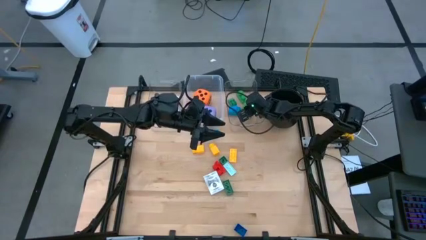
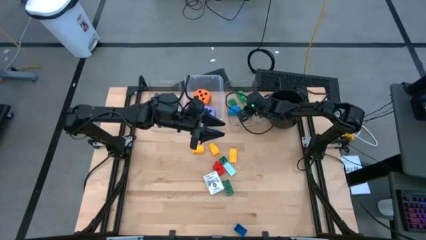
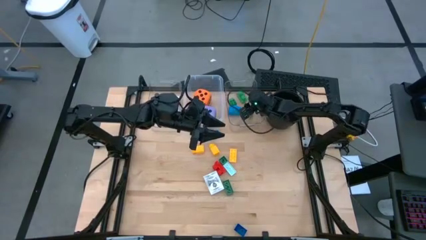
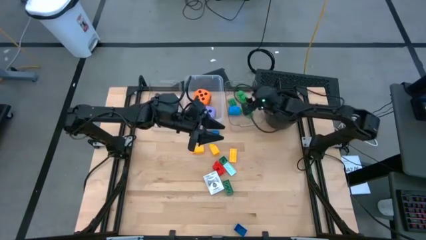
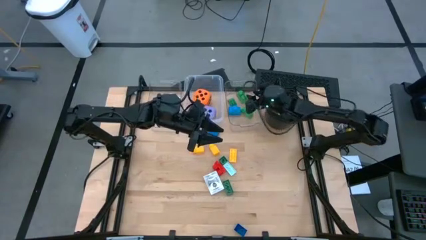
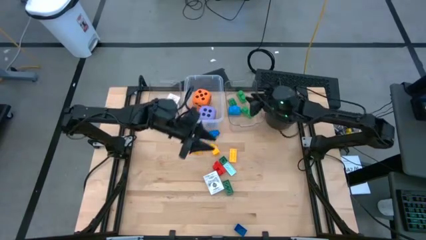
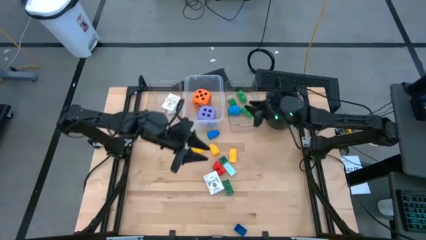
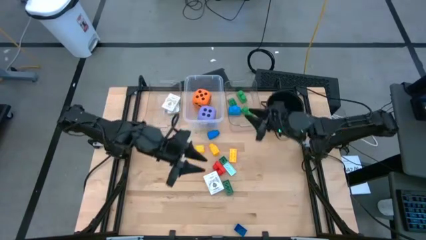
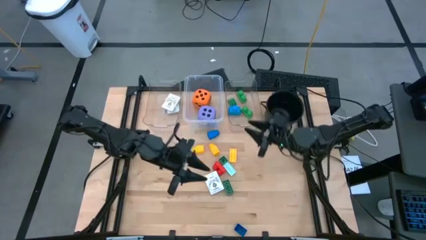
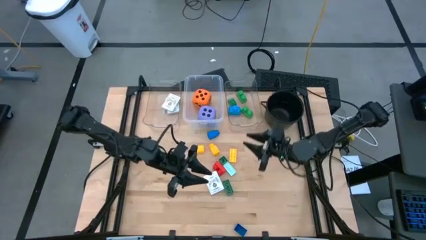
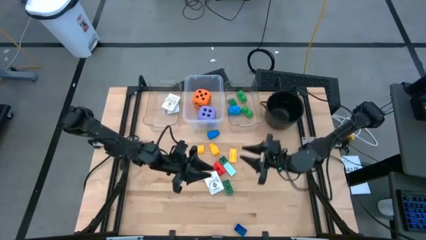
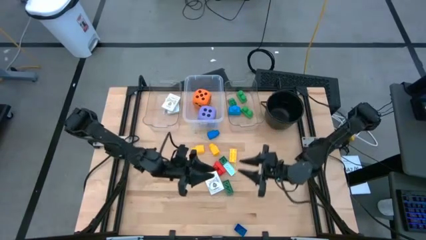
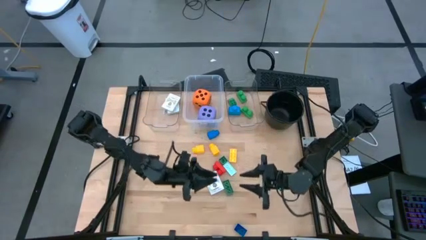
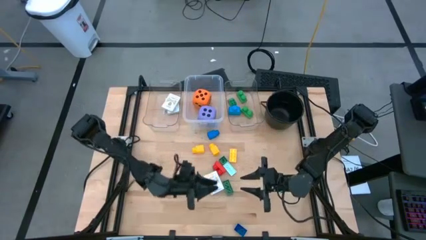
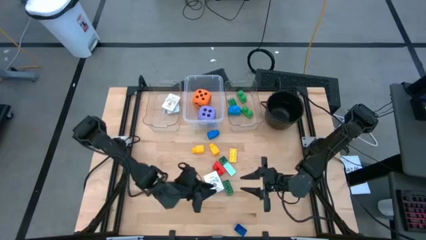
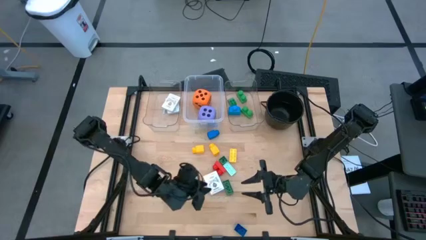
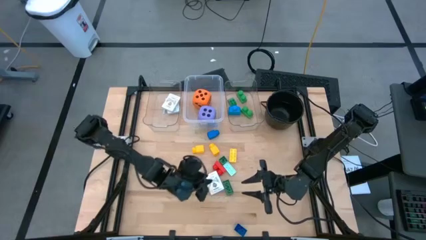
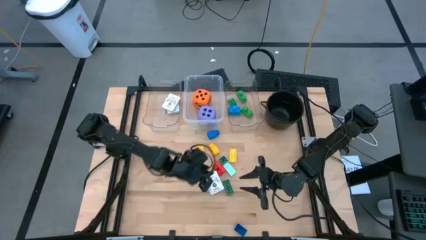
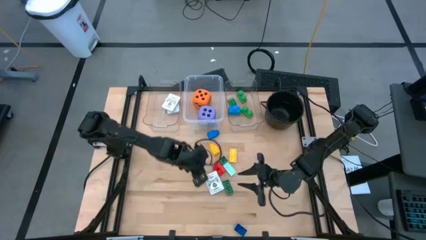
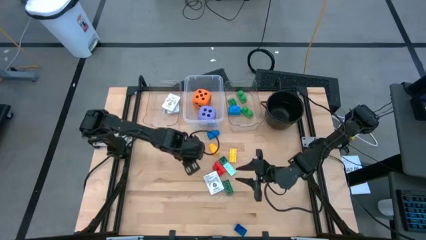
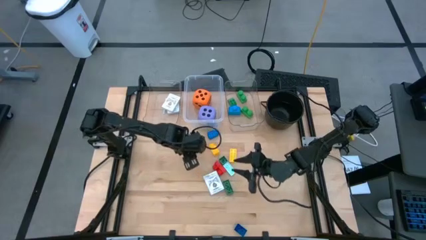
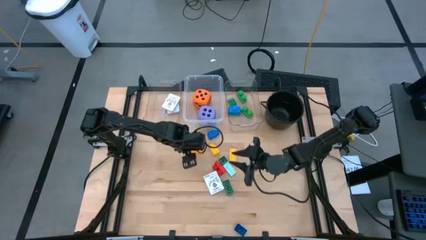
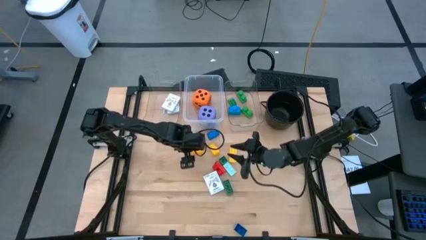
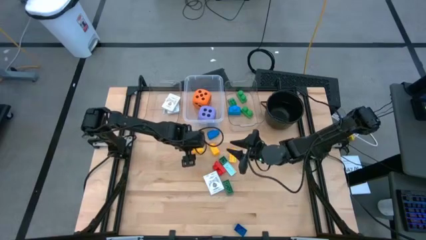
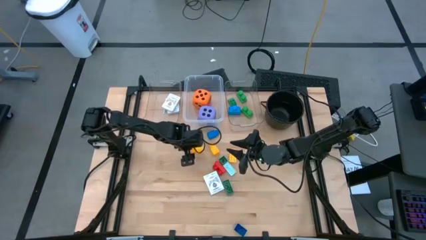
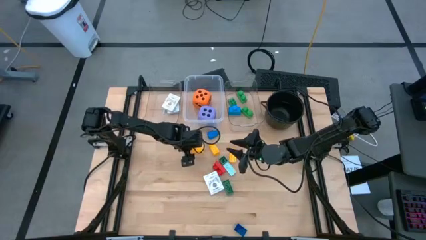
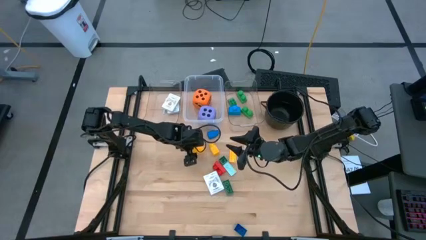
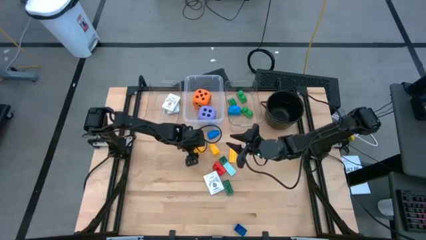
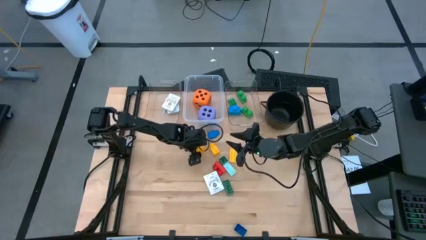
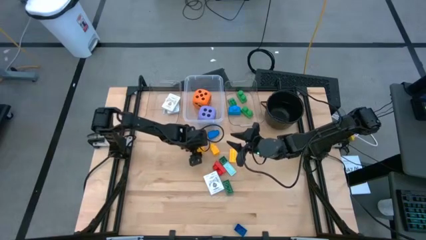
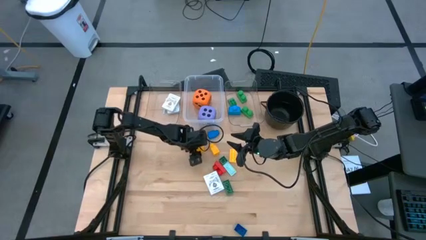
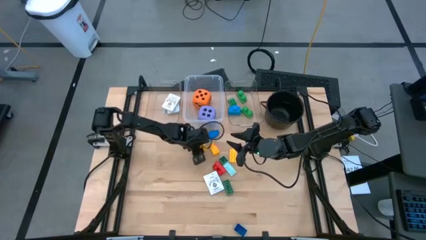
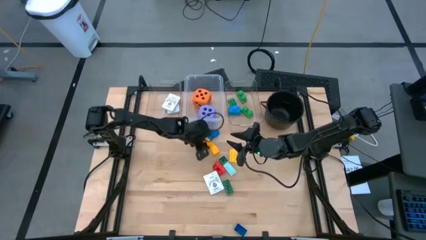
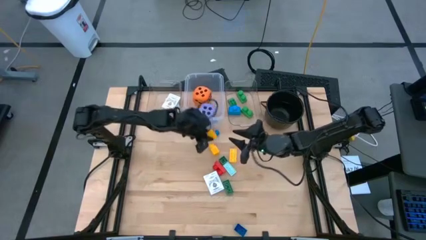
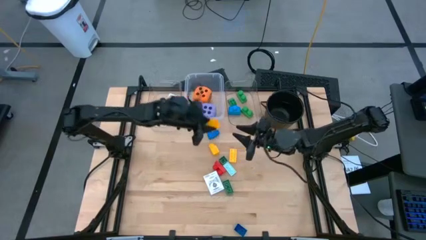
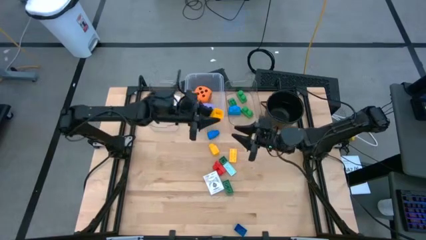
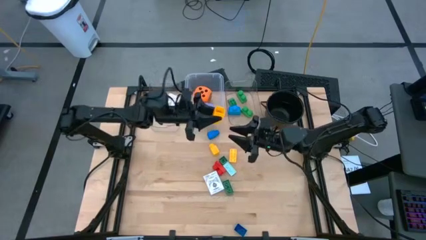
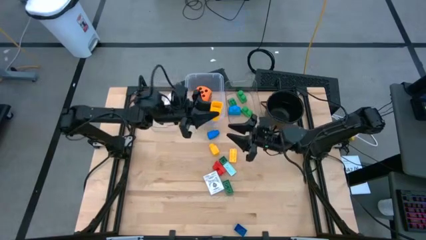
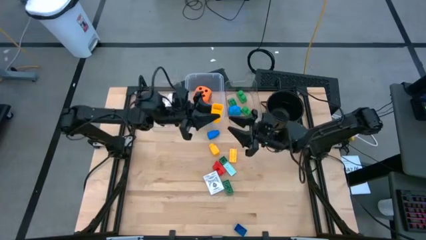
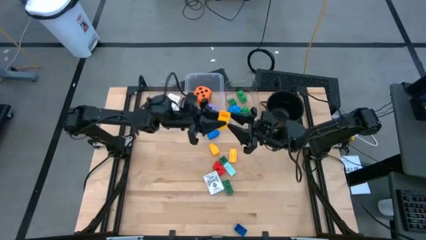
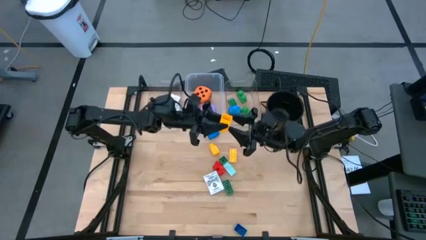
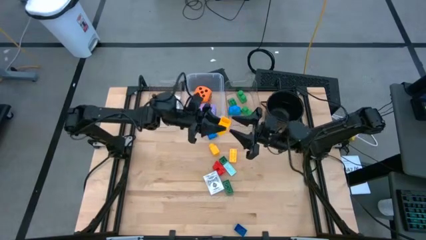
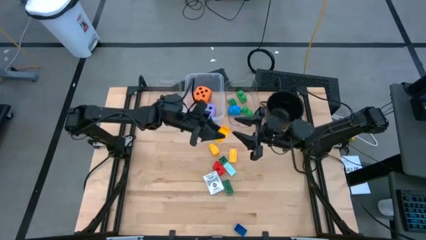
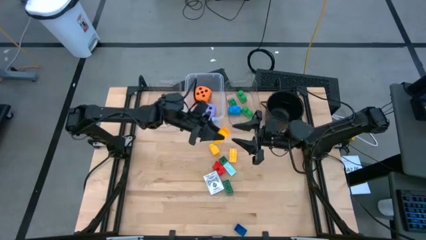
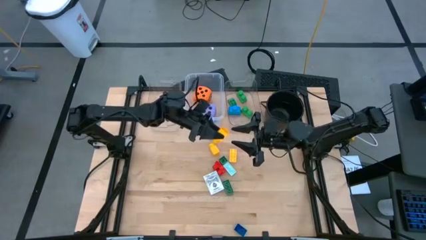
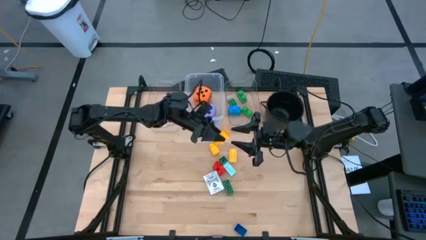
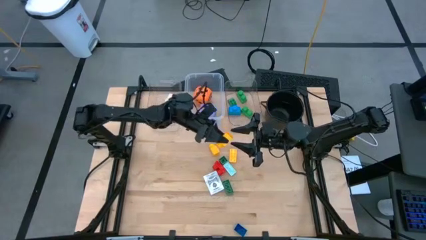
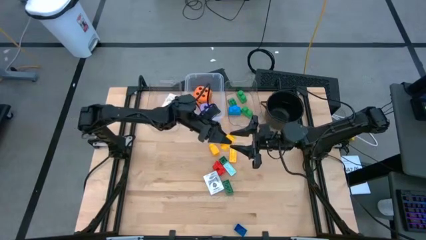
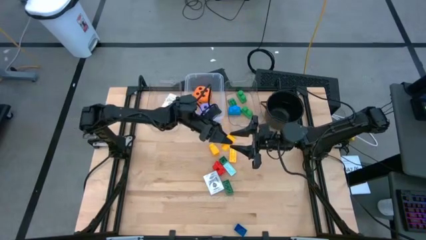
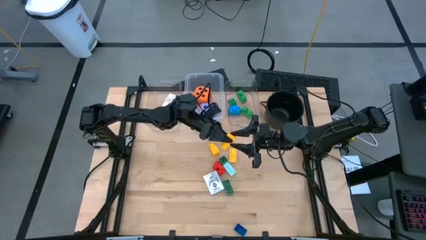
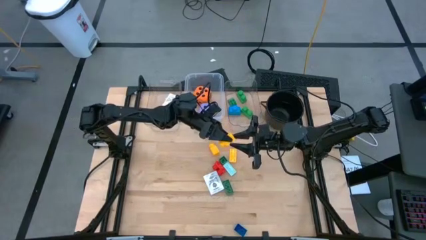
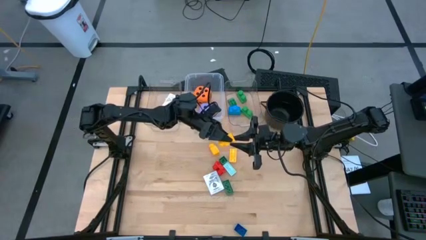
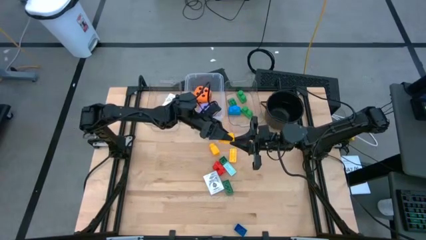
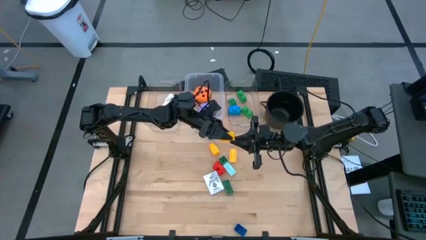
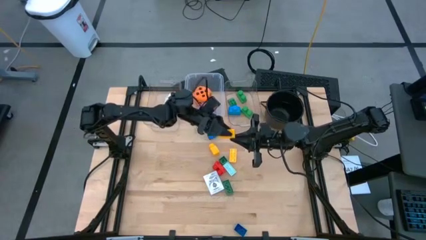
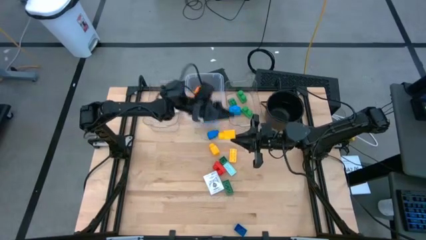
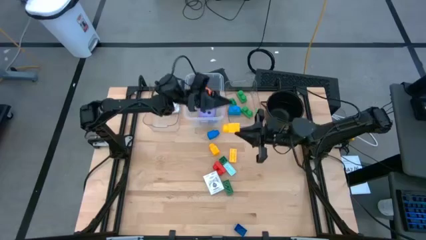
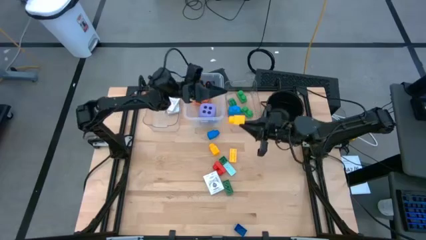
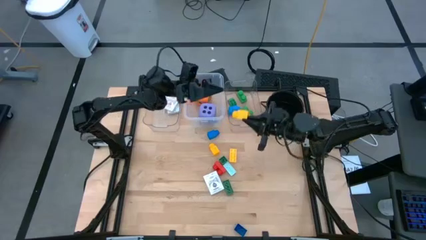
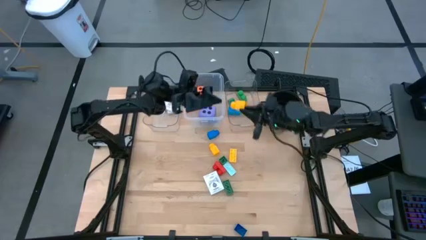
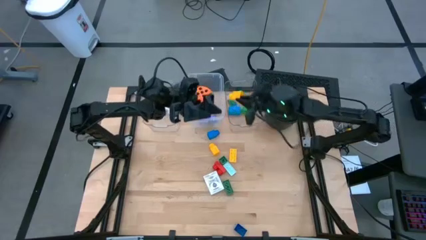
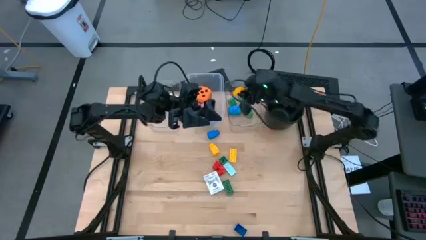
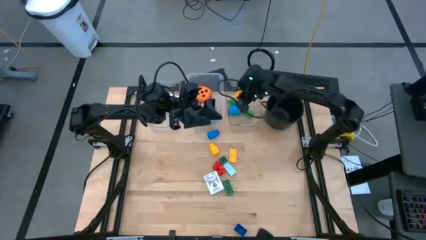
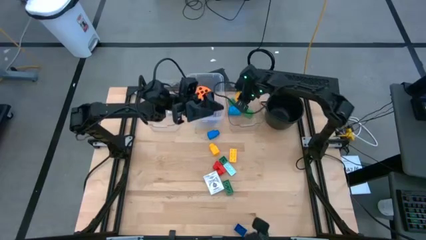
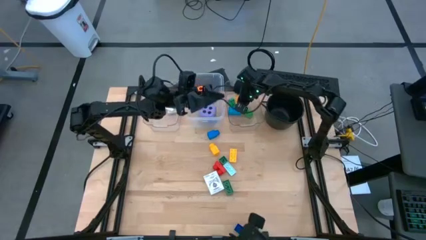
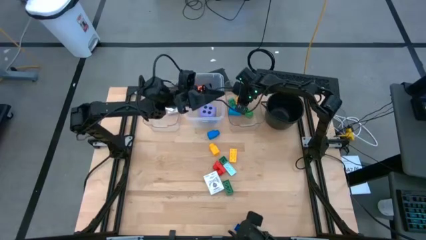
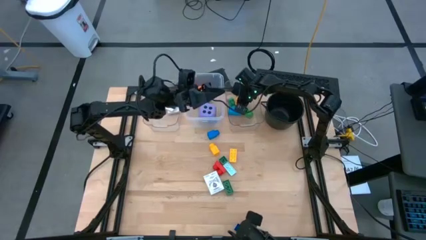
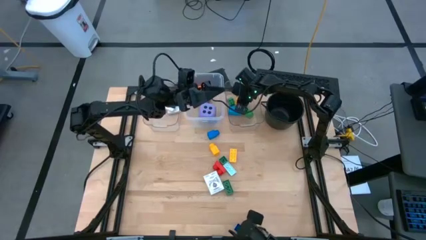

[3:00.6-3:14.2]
Task: Pick & Place Toys
Put the left yellow game piece into the right transparent bin

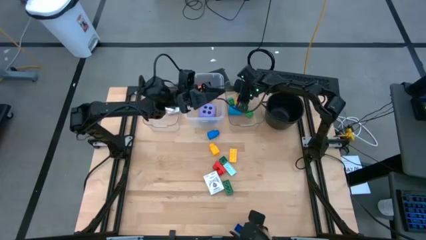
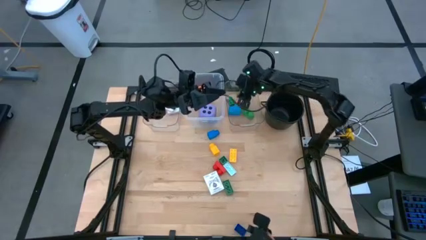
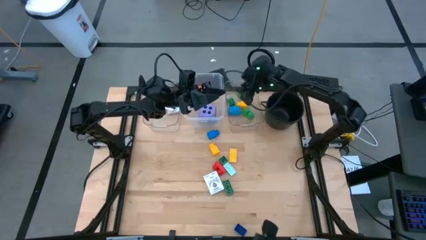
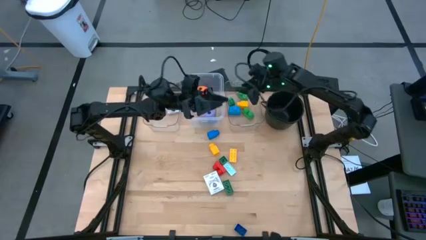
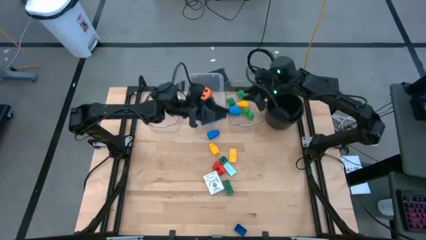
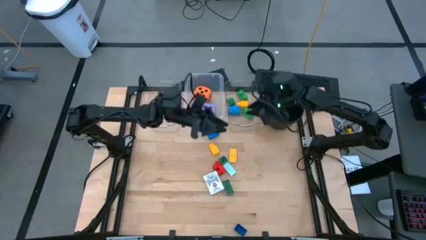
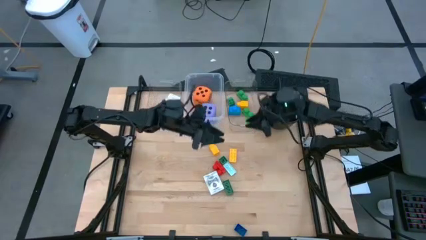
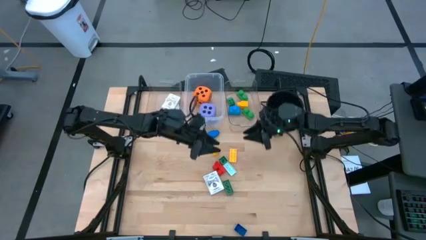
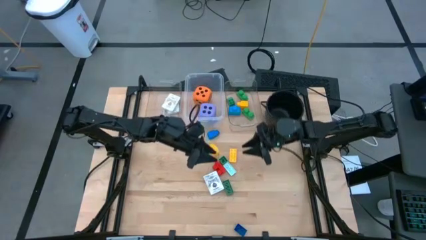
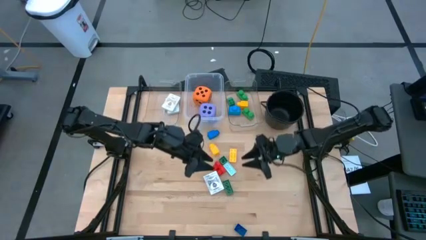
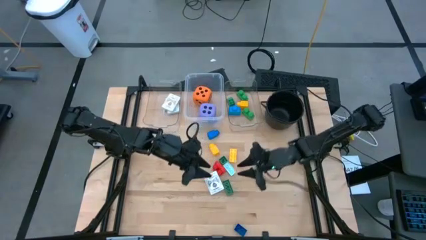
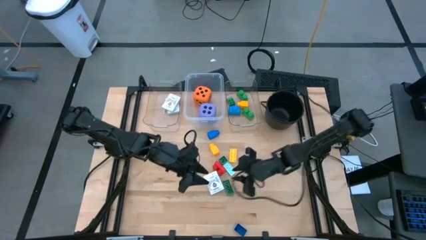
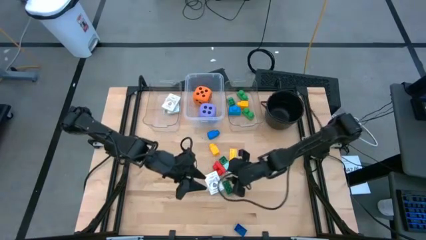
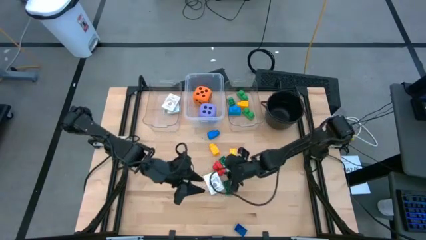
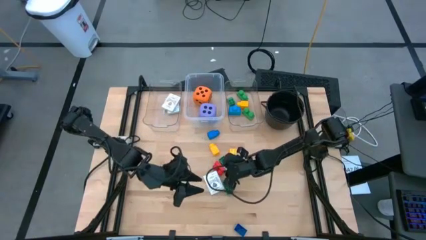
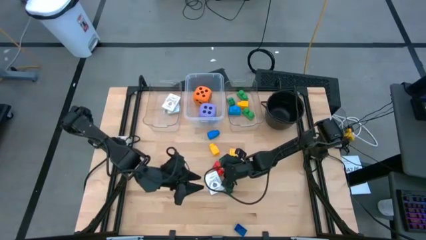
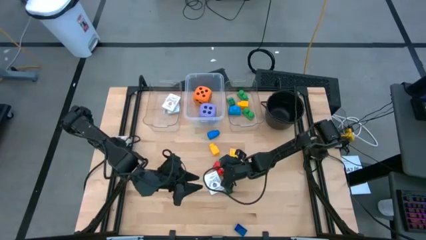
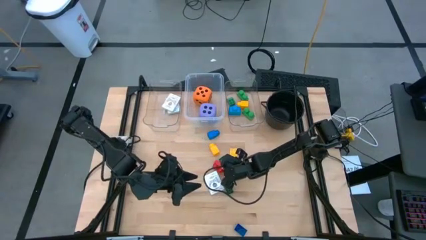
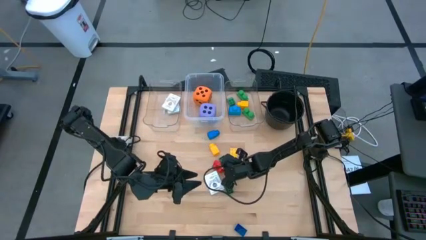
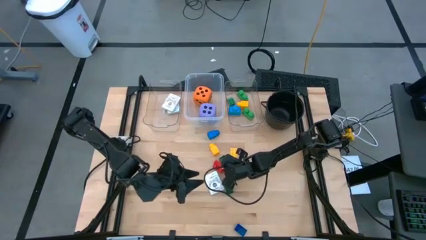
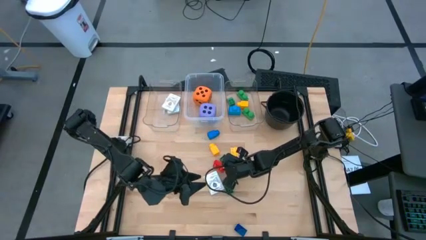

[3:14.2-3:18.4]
Put the red game piece into the right transparent bin
